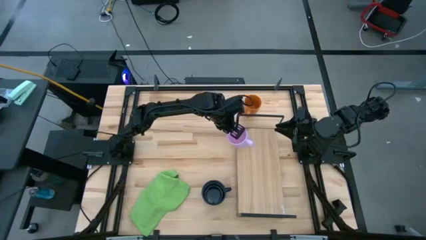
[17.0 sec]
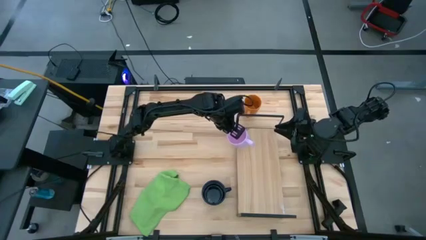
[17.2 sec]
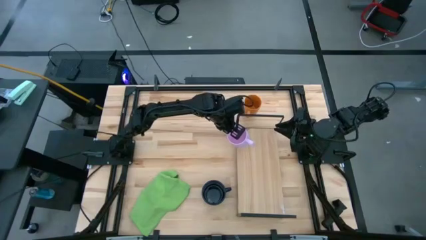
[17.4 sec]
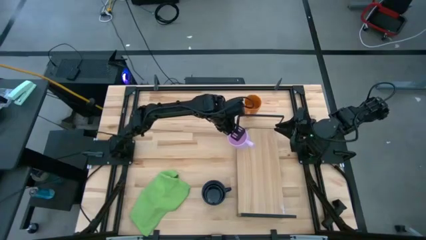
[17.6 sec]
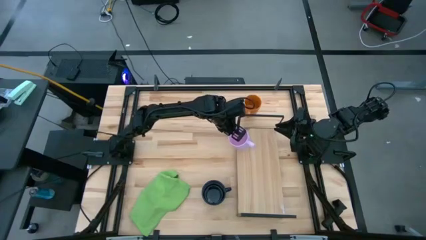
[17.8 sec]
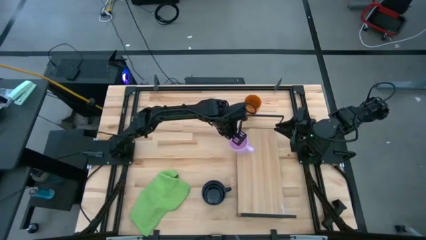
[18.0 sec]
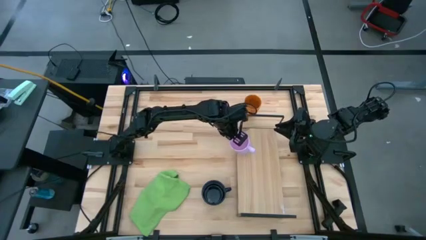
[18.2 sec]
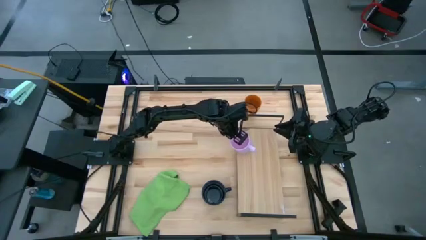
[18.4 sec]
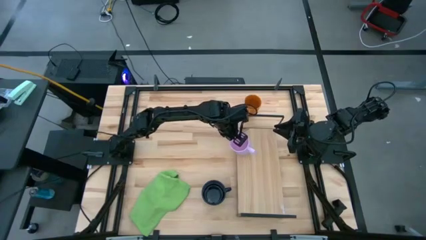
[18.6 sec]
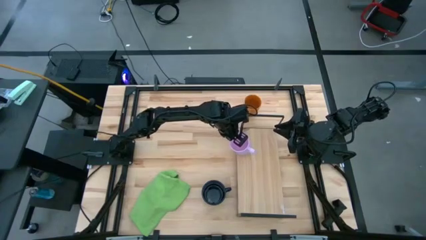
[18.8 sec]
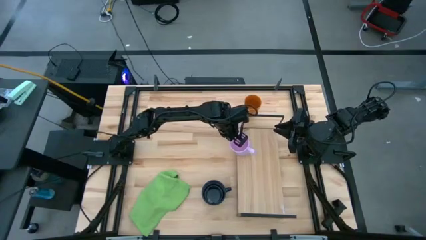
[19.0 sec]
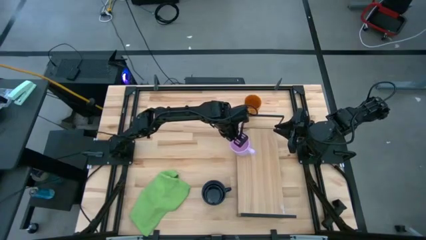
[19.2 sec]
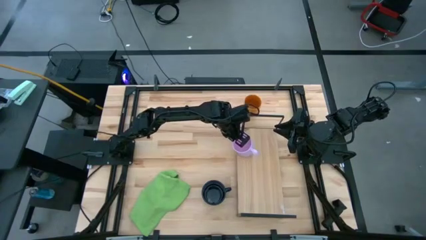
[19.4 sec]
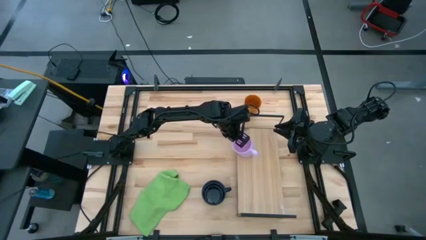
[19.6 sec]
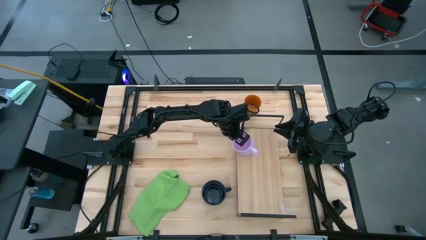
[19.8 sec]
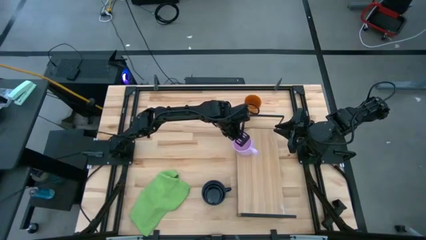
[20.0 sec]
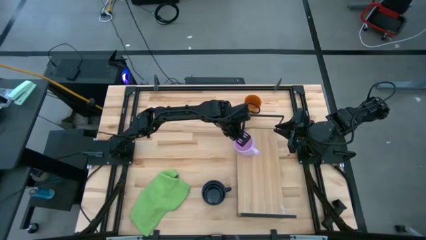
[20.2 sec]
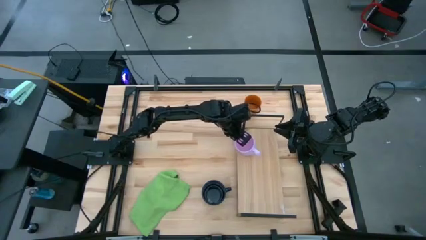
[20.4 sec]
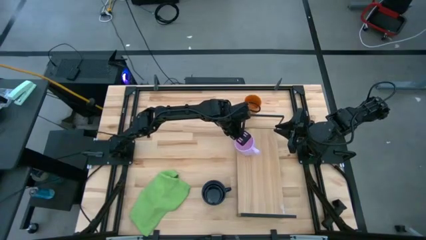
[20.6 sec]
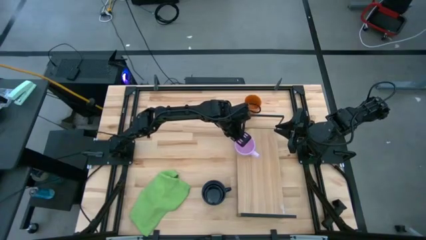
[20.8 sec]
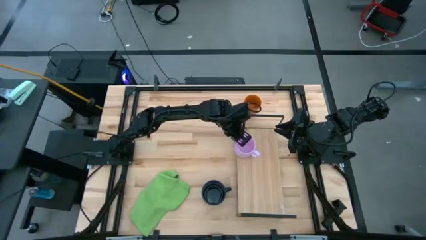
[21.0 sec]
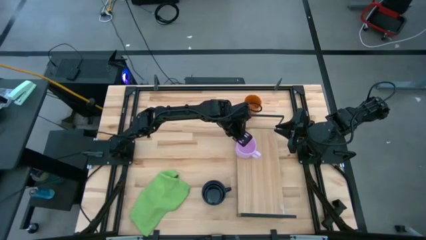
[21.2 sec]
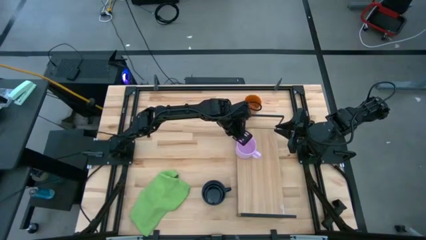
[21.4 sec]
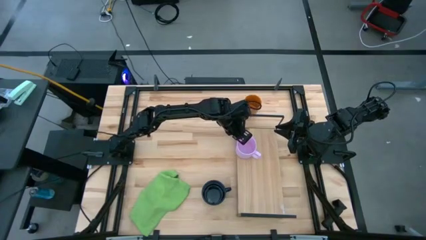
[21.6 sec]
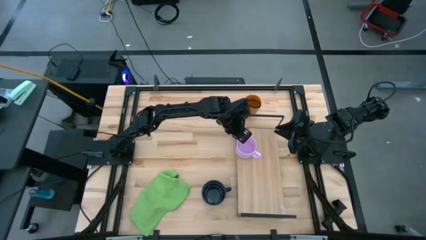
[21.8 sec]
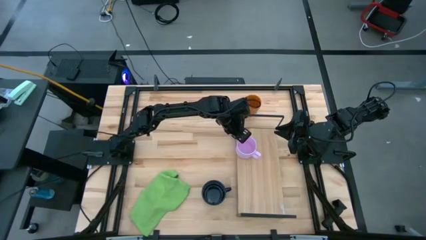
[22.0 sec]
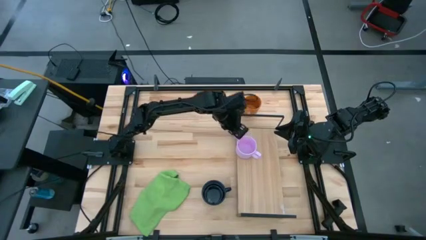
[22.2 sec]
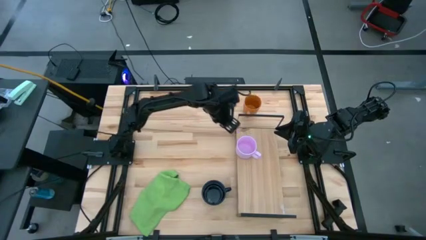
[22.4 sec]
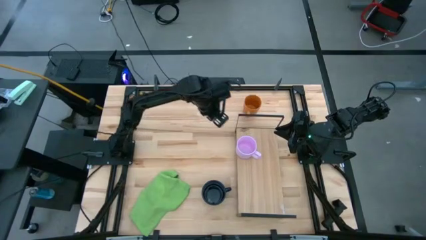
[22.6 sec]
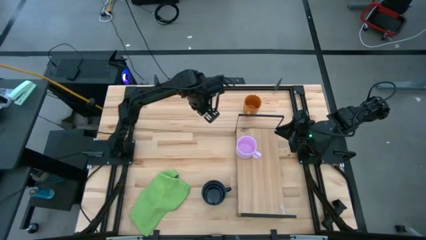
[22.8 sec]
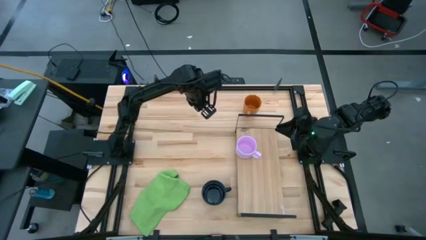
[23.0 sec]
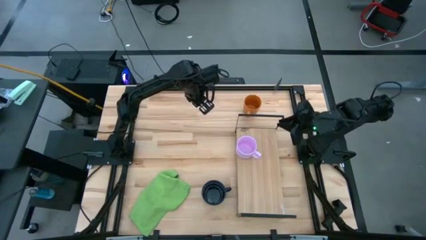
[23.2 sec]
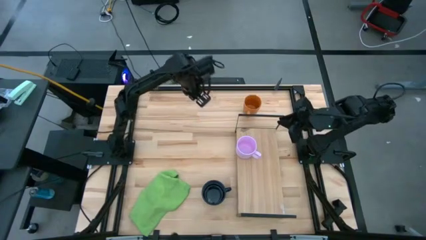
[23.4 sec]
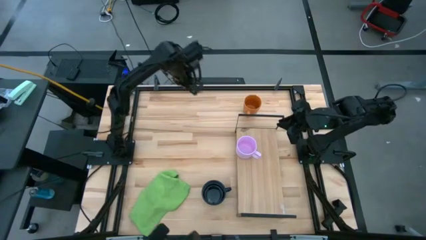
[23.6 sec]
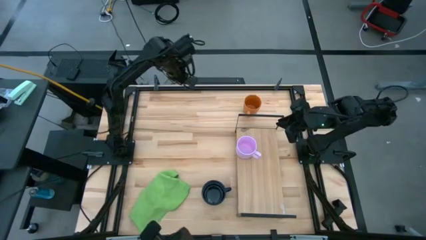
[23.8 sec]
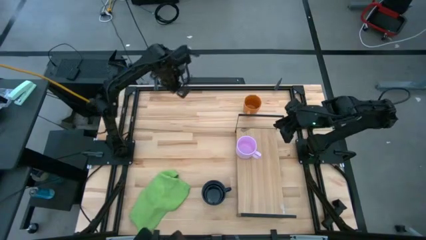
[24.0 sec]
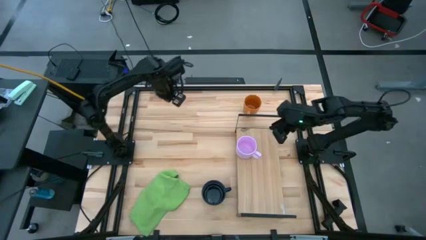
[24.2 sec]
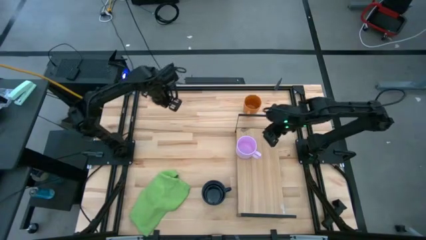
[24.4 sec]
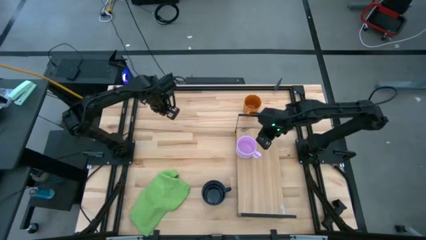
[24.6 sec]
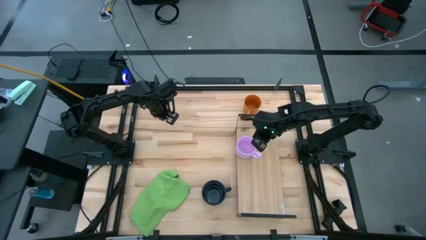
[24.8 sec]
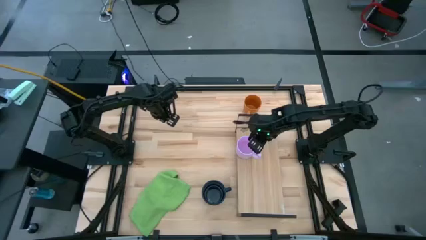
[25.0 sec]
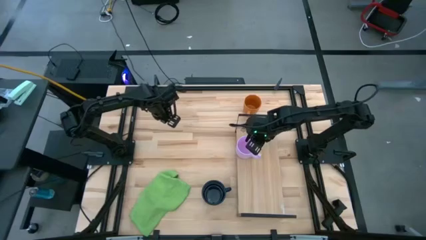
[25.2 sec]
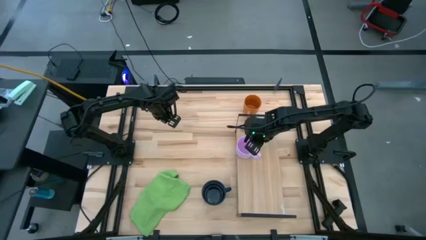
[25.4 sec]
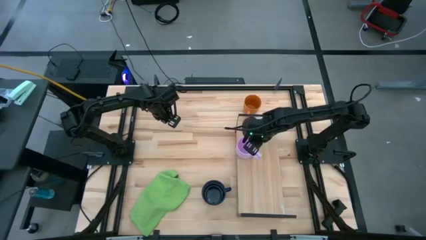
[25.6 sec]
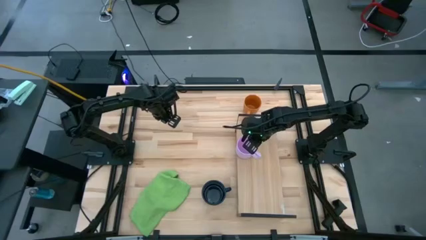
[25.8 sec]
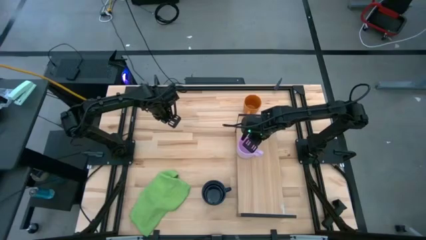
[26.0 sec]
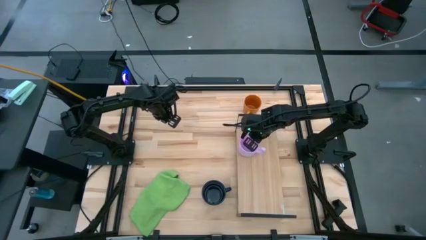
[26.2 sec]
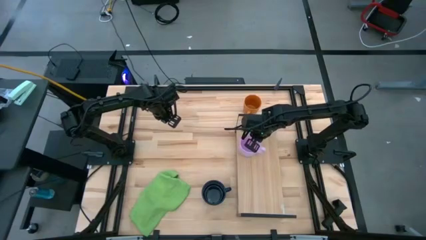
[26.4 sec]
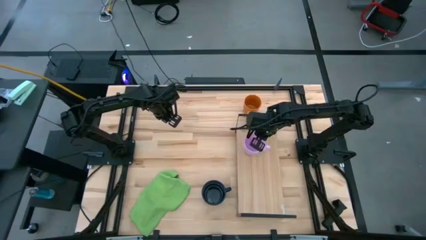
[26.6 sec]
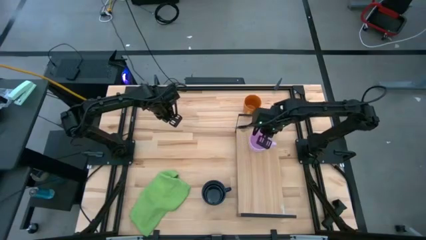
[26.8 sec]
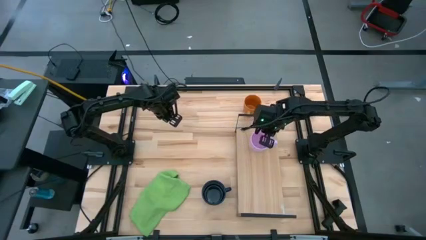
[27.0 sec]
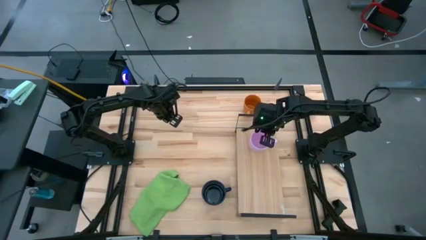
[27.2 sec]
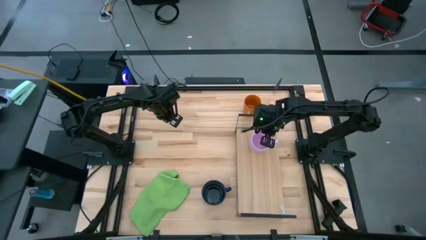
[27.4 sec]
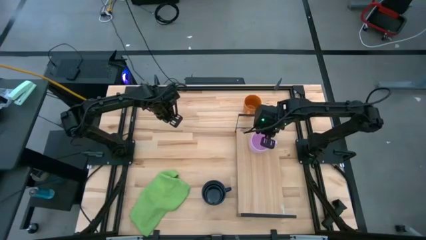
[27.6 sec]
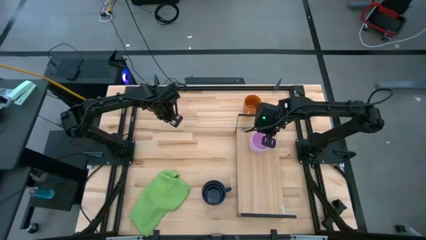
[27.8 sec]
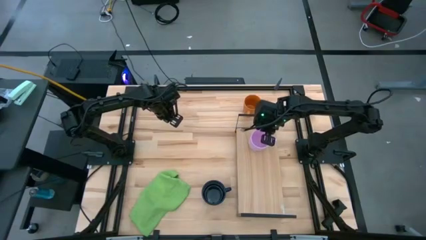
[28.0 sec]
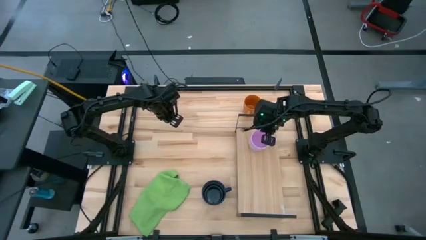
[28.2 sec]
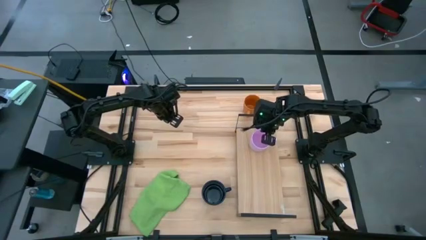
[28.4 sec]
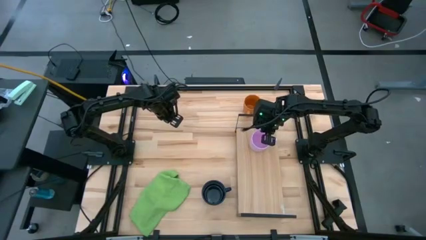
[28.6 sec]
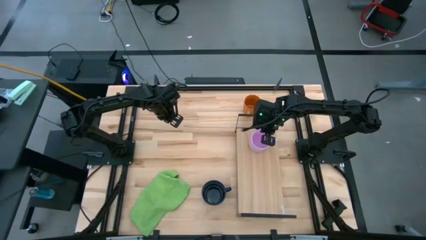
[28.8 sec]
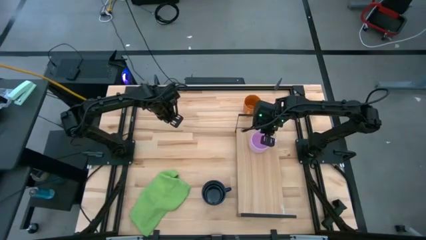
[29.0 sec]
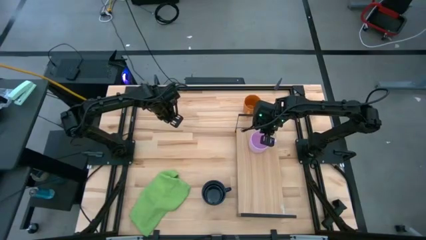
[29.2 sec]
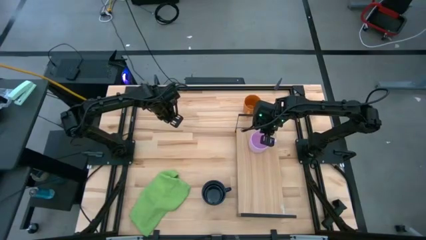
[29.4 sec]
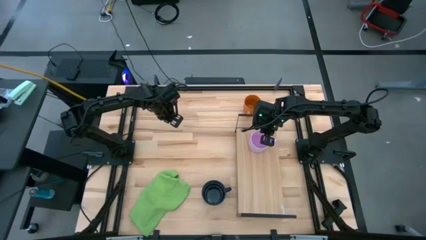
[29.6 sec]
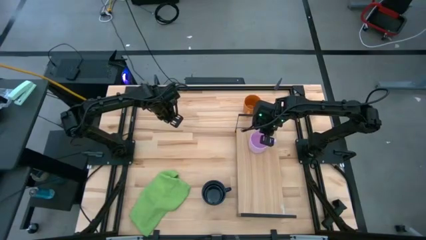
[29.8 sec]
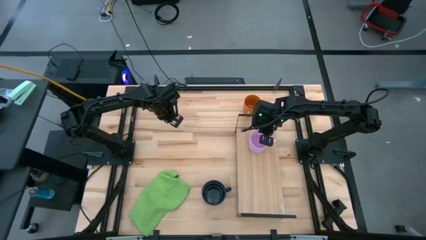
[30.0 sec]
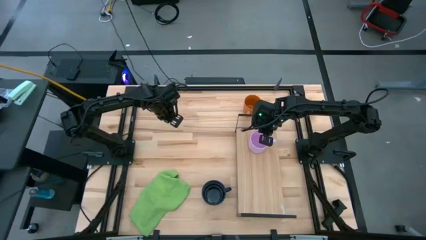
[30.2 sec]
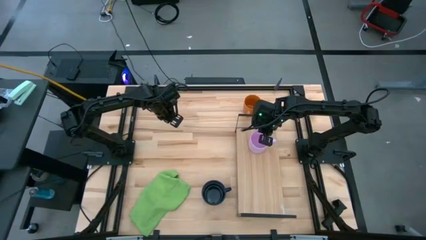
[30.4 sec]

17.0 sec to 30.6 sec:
Task: Stack small to large cups/mugs on shelf
Put the light violet mug on the shelf
